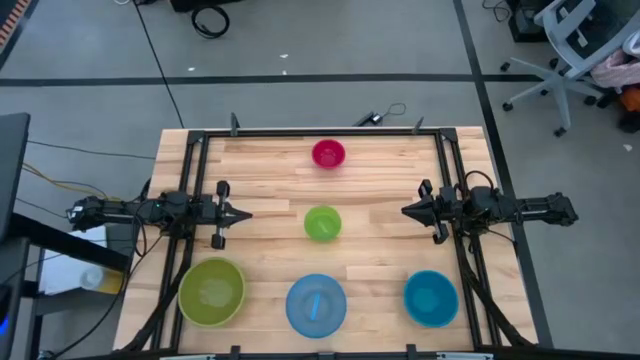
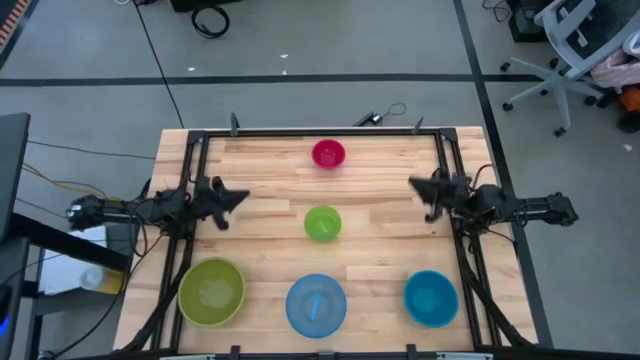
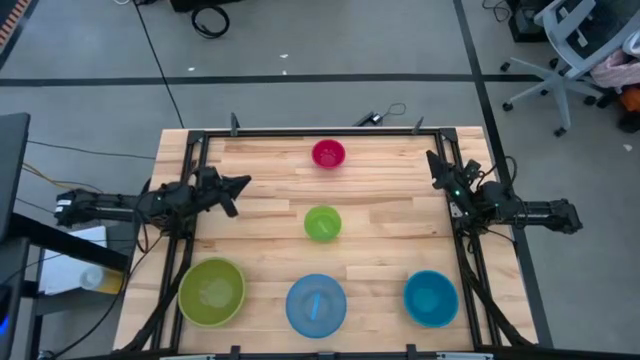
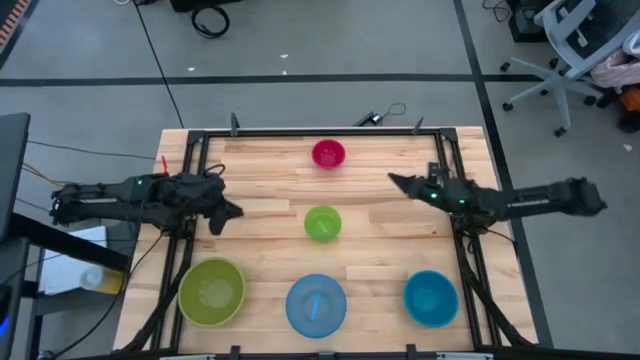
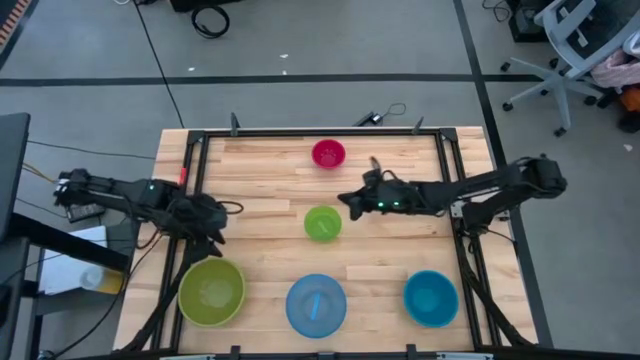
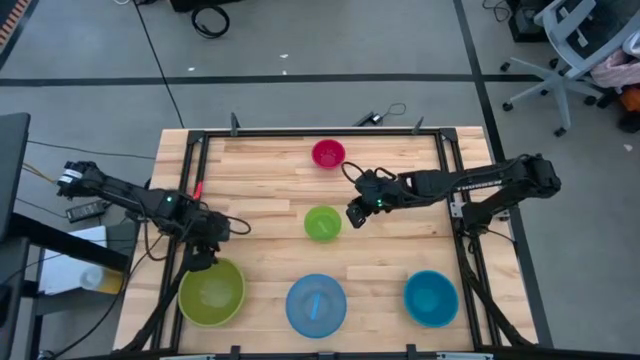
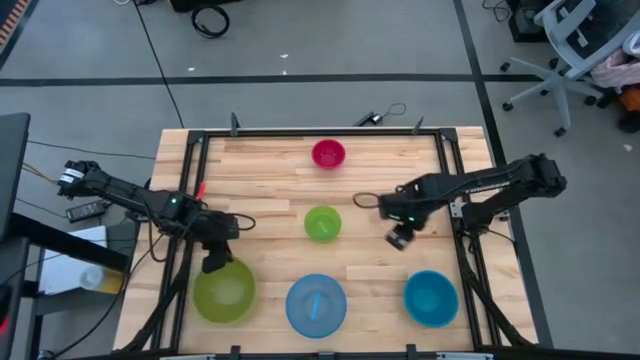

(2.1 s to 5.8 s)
Adjust the extra large dark green bowl on the table

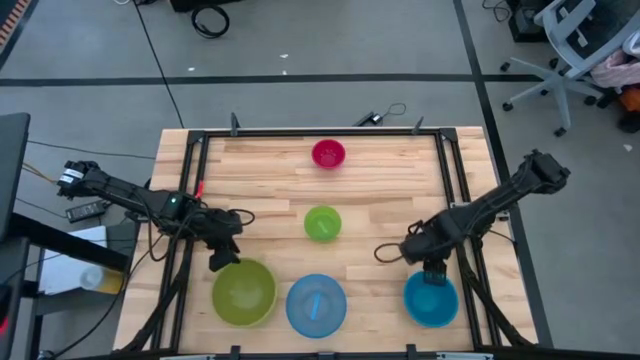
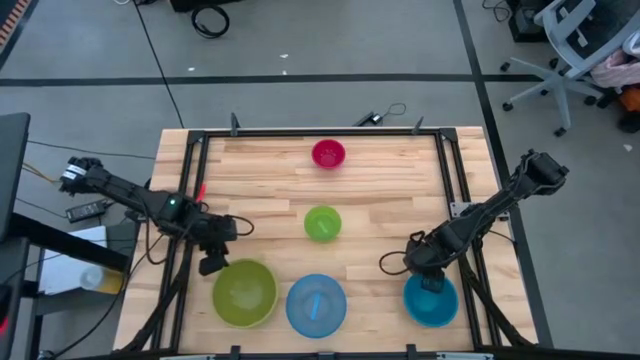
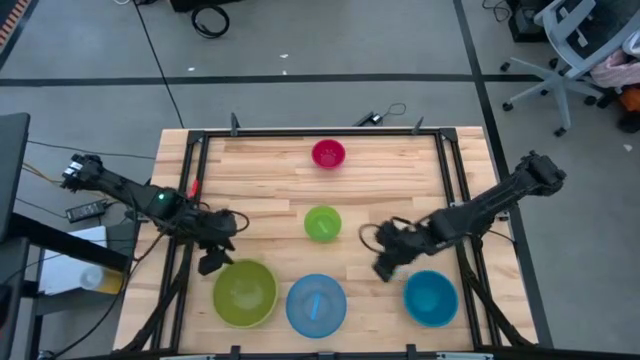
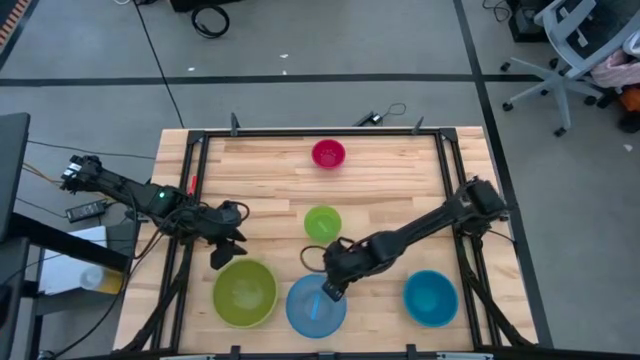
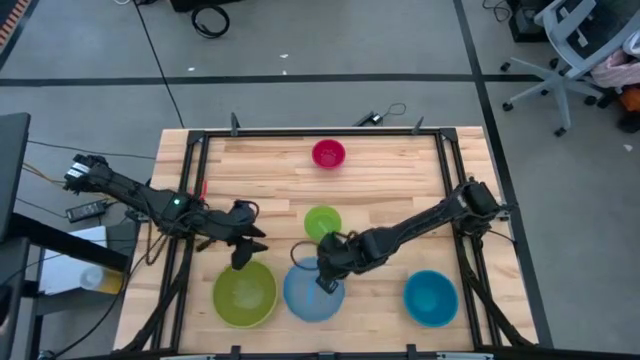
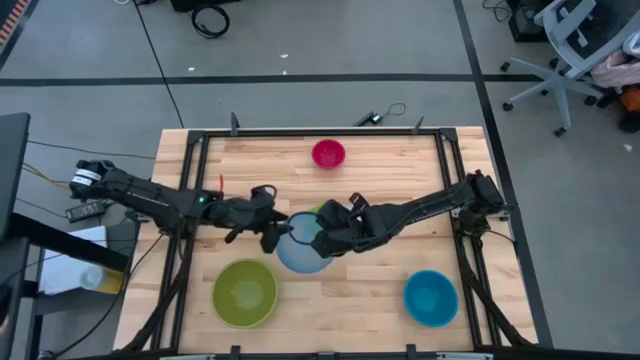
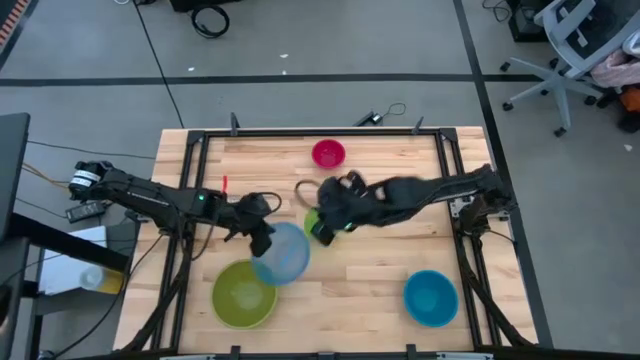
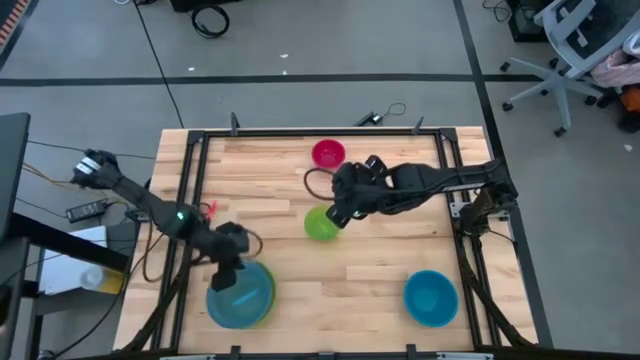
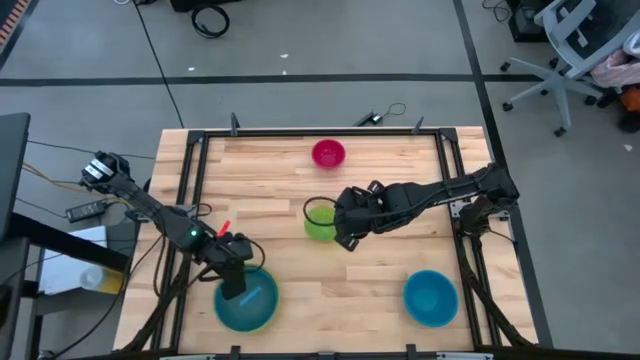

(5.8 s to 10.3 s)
Stack the large light blue bowl on top of the extra large dark green bowl

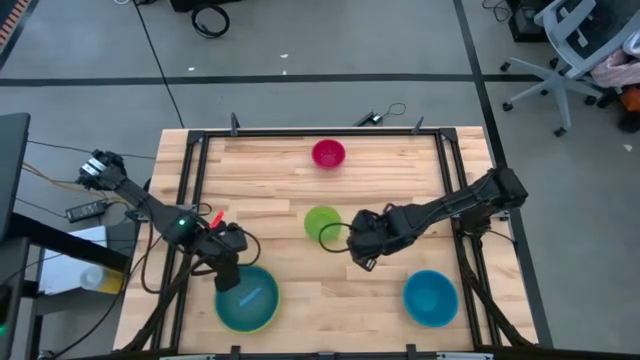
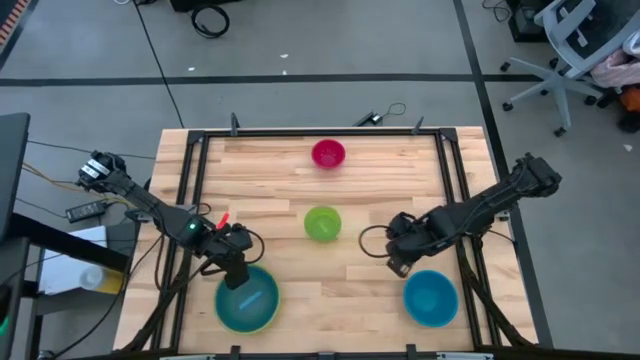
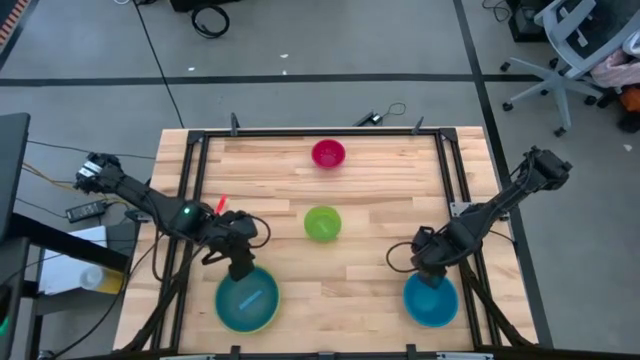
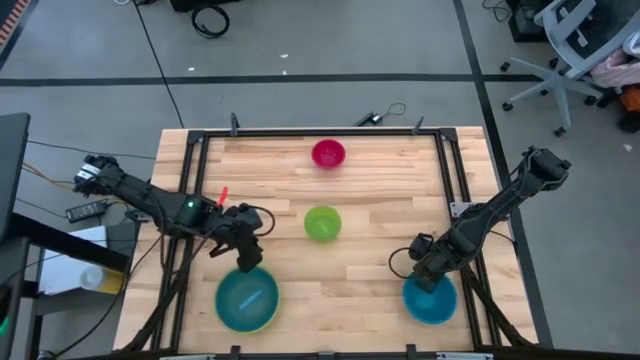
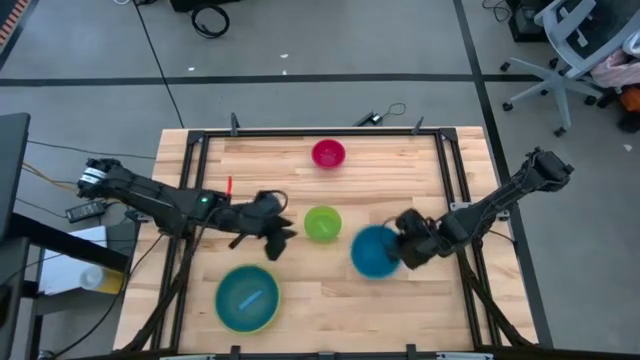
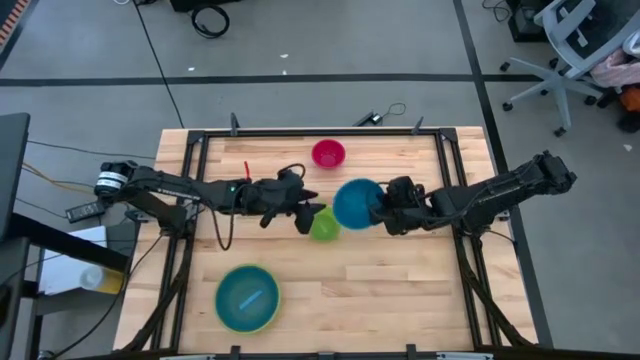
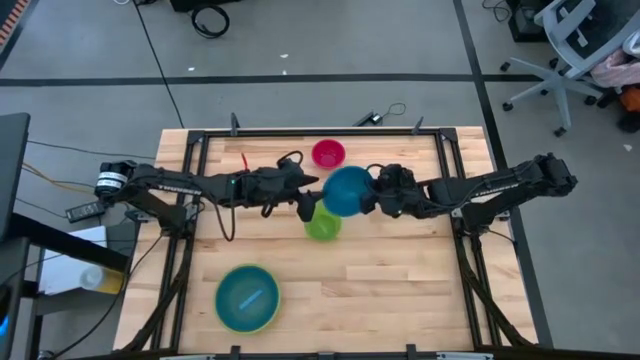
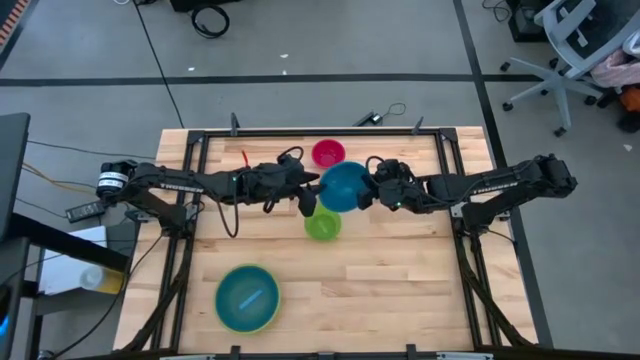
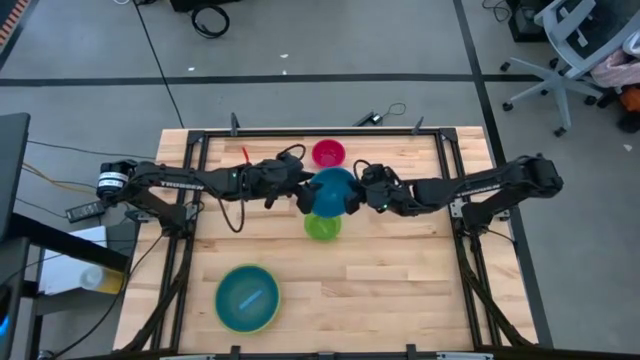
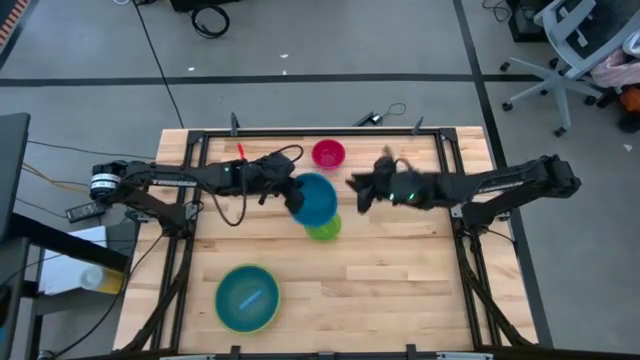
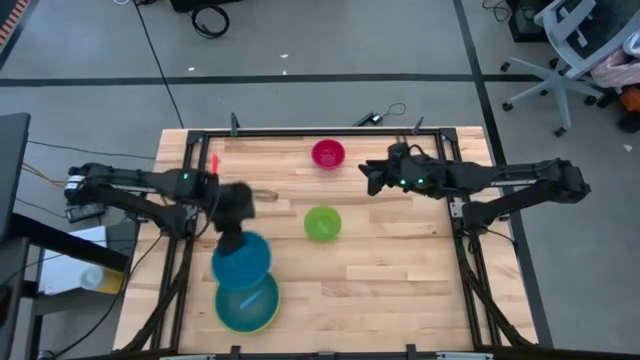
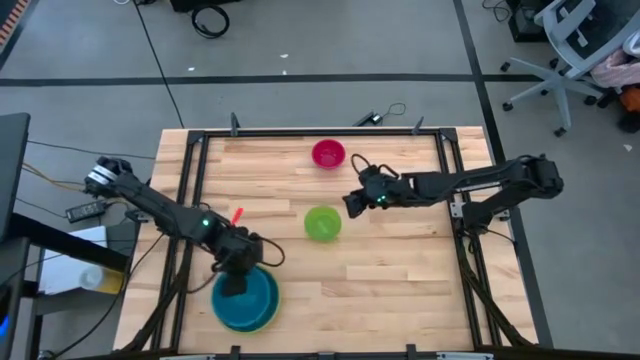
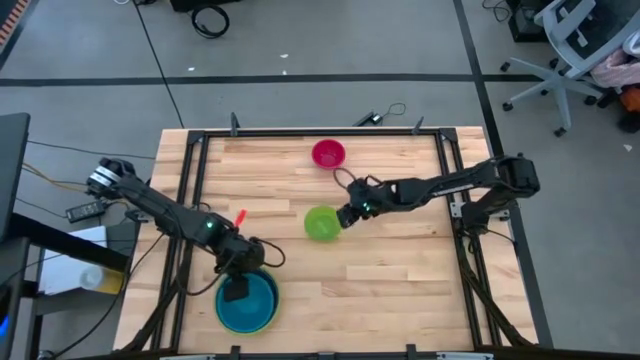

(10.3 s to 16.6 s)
Stack the medium blue bowl on top of the large light blue bowl

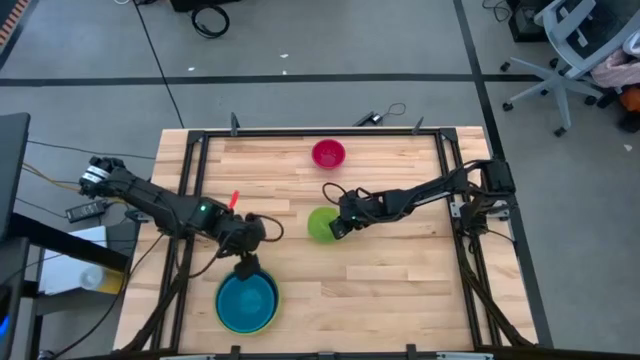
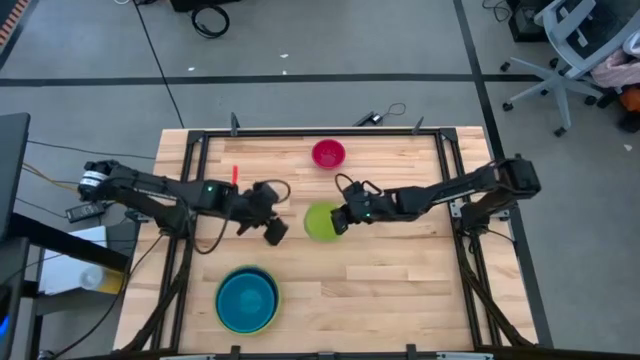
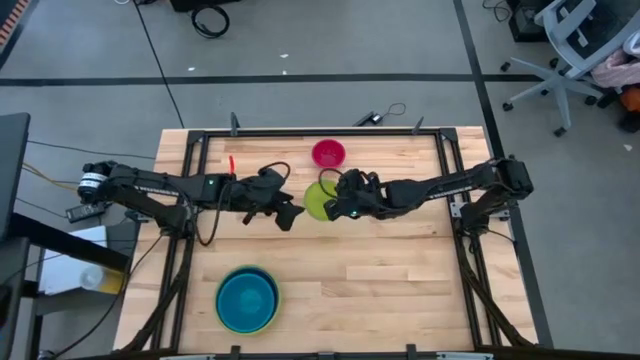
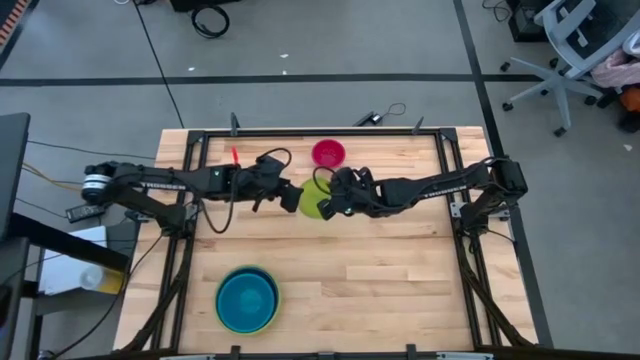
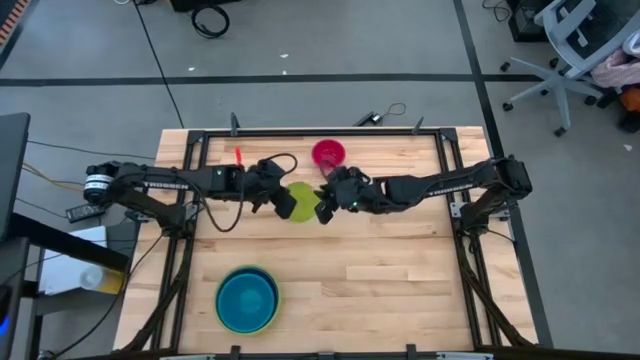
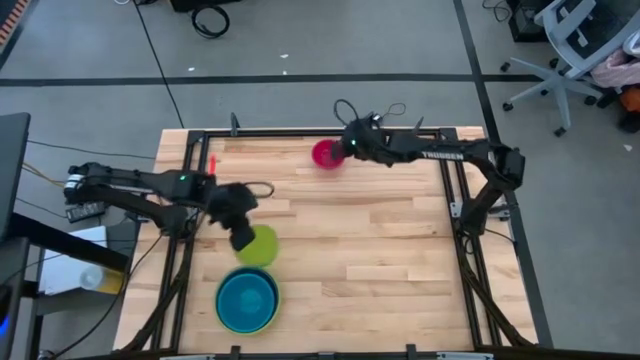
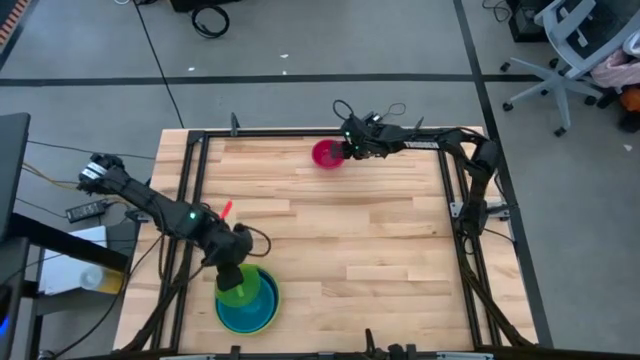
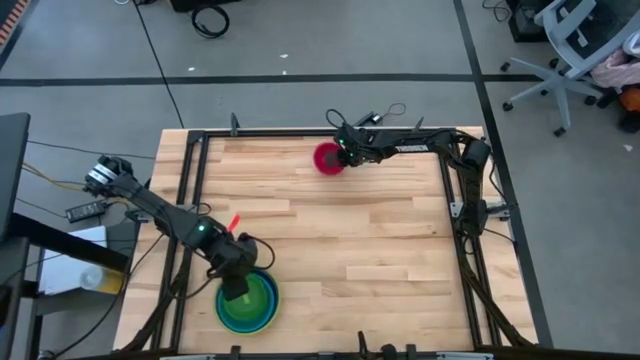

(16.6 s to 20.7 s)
Stack the small green bowl on top of the medium blue bowl
